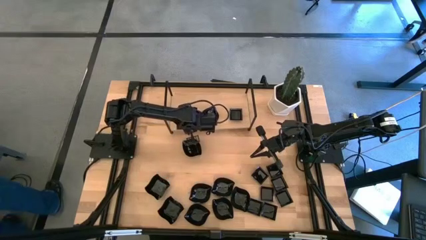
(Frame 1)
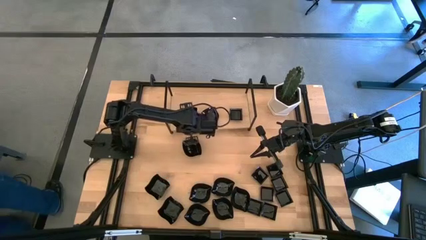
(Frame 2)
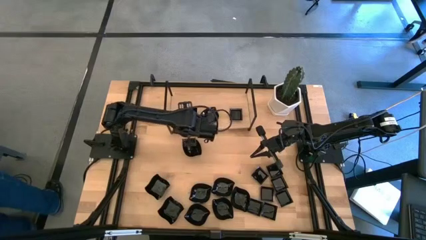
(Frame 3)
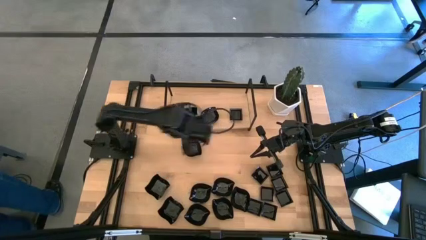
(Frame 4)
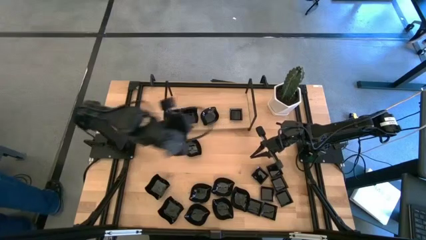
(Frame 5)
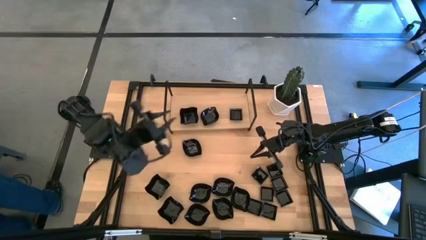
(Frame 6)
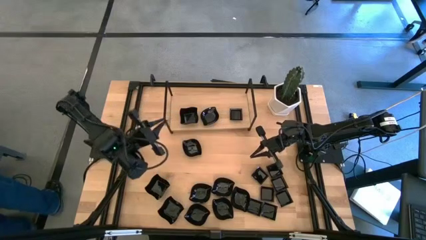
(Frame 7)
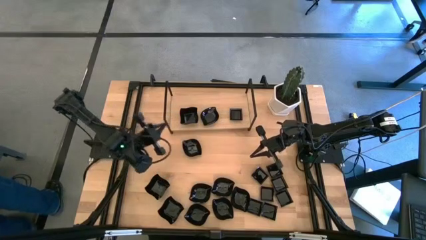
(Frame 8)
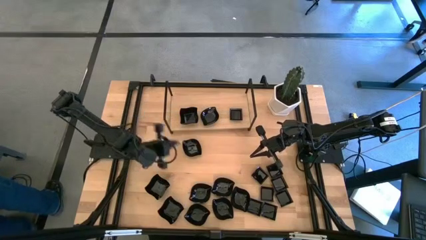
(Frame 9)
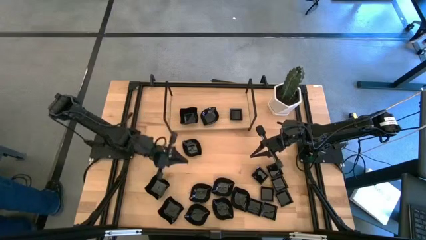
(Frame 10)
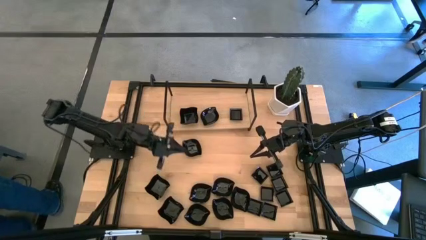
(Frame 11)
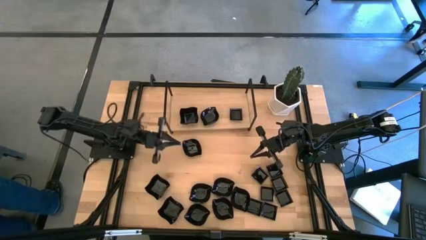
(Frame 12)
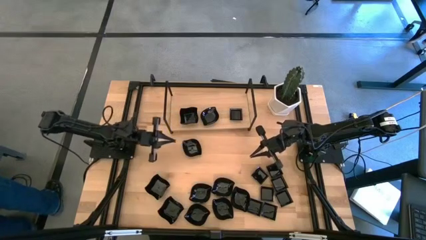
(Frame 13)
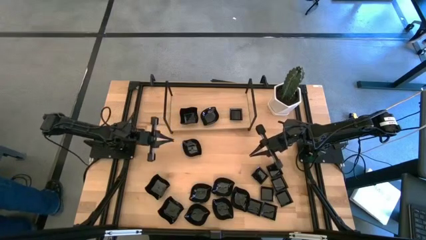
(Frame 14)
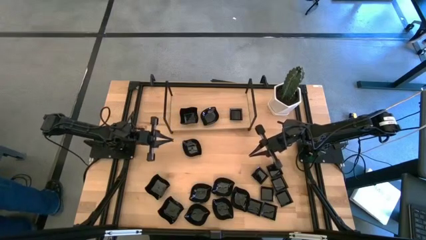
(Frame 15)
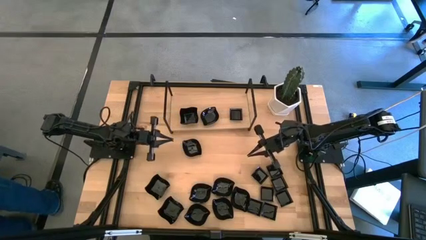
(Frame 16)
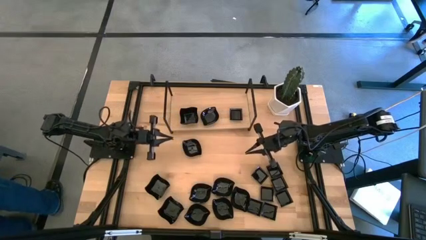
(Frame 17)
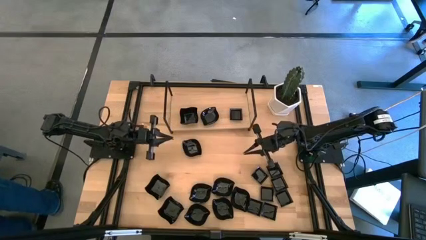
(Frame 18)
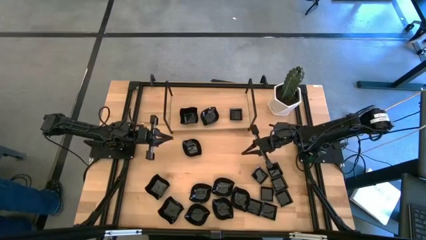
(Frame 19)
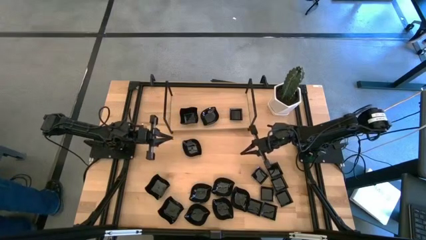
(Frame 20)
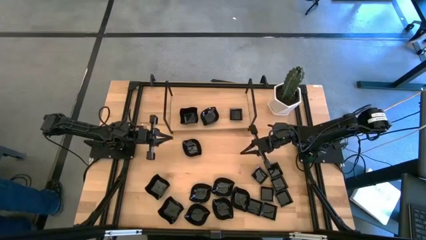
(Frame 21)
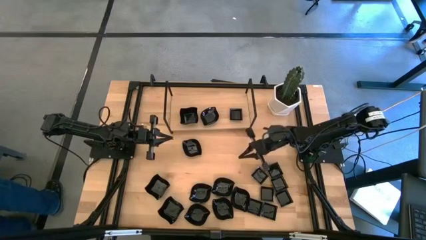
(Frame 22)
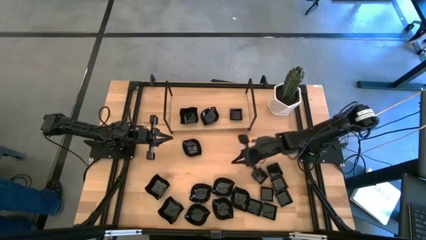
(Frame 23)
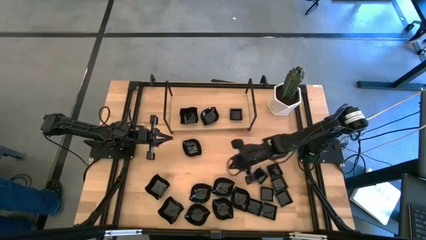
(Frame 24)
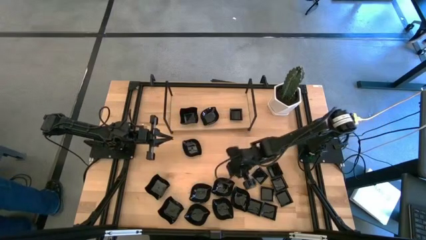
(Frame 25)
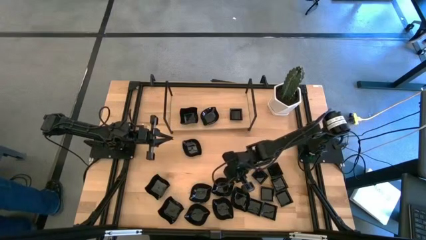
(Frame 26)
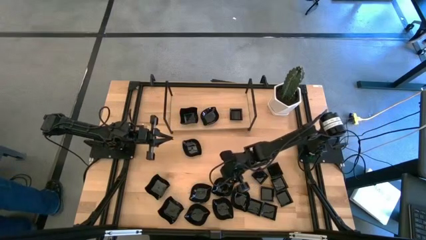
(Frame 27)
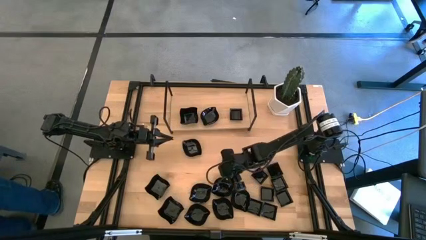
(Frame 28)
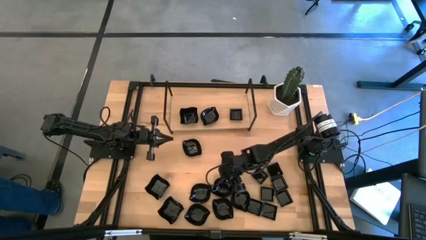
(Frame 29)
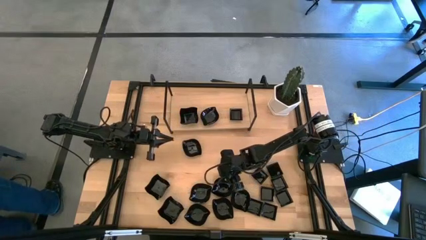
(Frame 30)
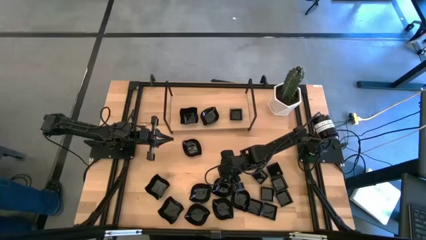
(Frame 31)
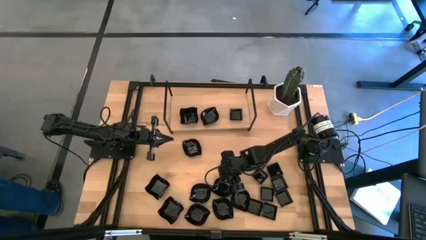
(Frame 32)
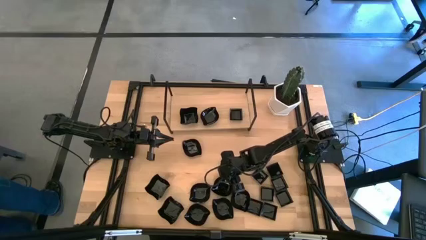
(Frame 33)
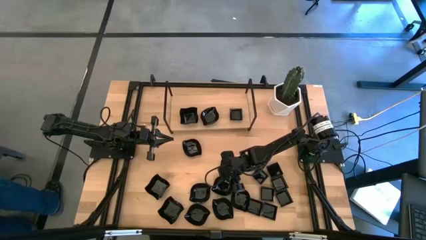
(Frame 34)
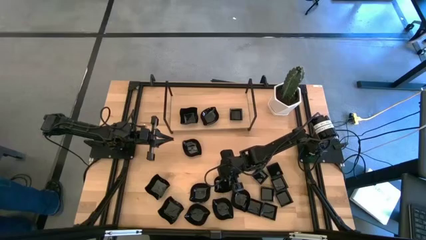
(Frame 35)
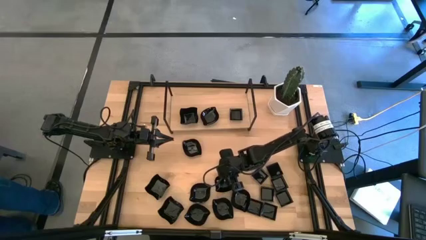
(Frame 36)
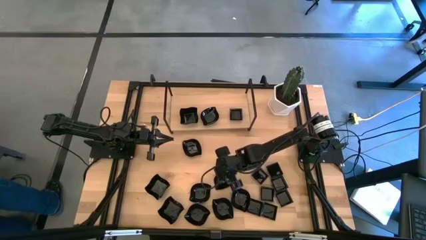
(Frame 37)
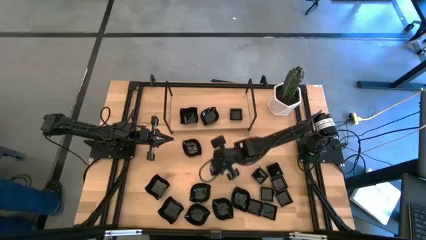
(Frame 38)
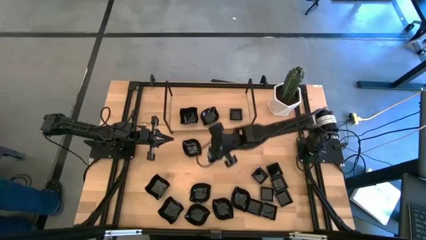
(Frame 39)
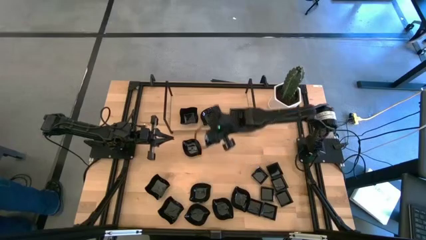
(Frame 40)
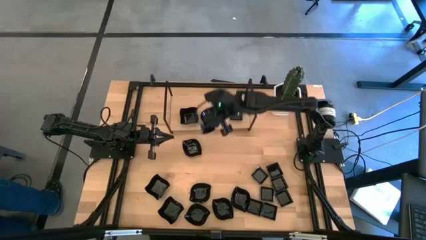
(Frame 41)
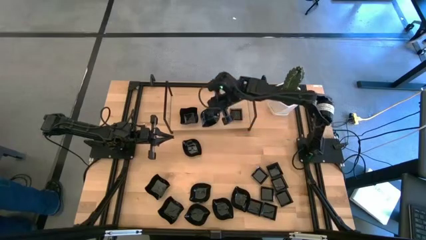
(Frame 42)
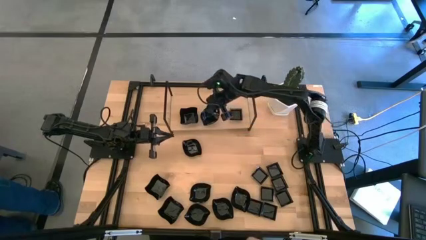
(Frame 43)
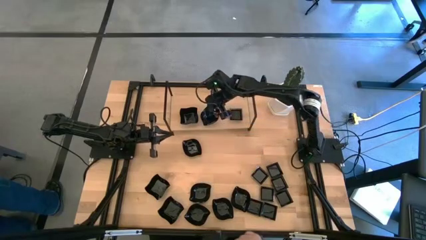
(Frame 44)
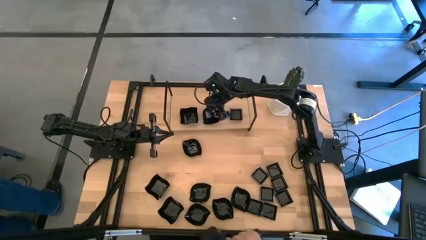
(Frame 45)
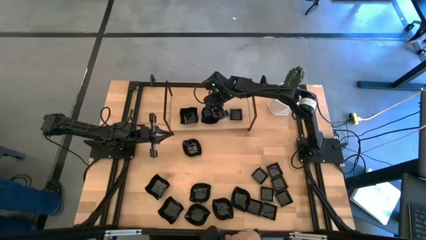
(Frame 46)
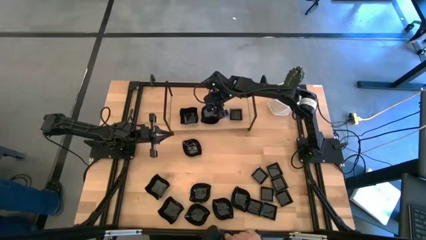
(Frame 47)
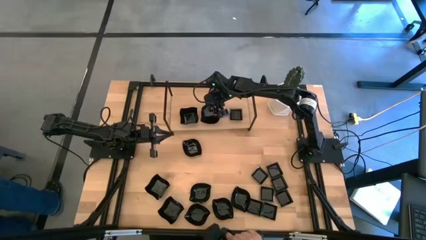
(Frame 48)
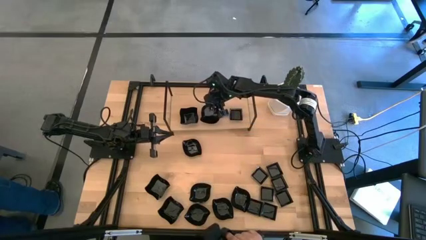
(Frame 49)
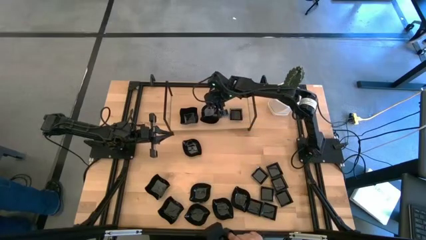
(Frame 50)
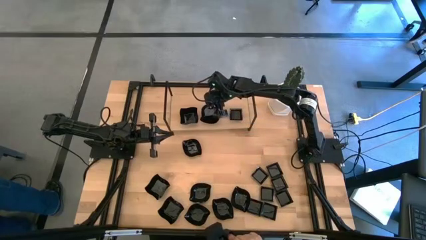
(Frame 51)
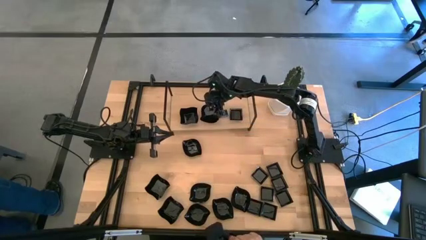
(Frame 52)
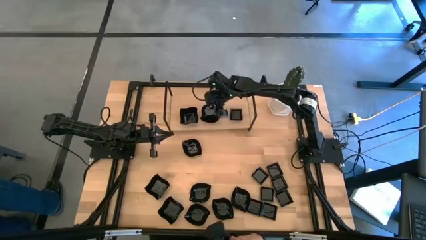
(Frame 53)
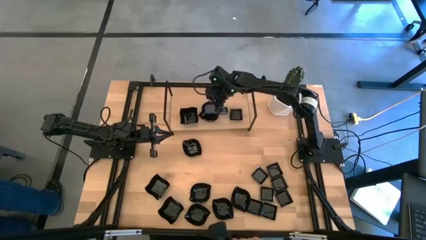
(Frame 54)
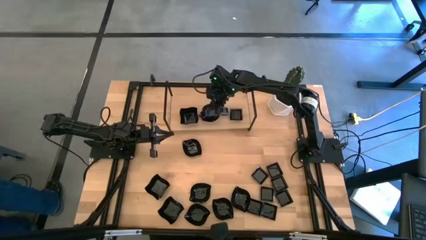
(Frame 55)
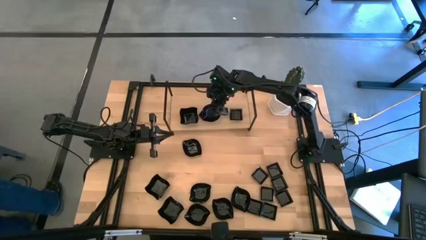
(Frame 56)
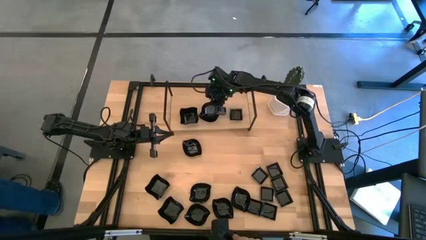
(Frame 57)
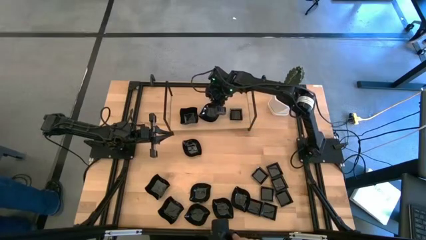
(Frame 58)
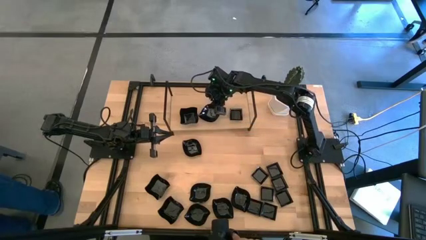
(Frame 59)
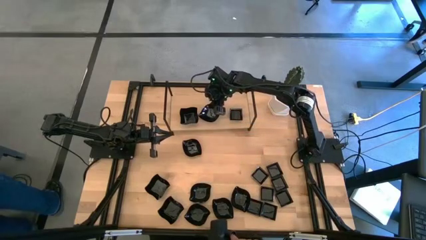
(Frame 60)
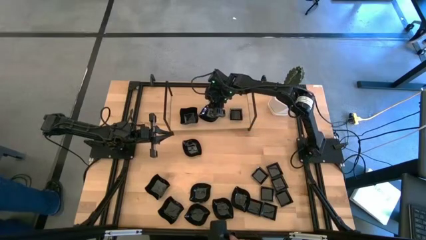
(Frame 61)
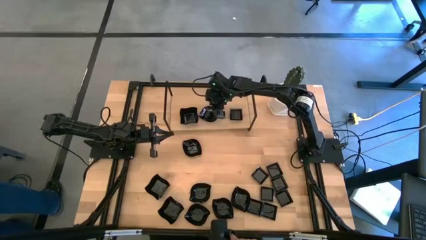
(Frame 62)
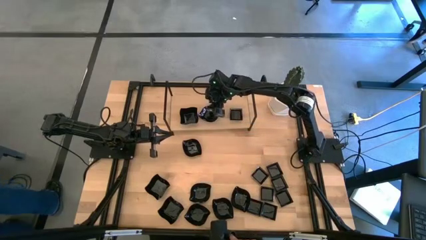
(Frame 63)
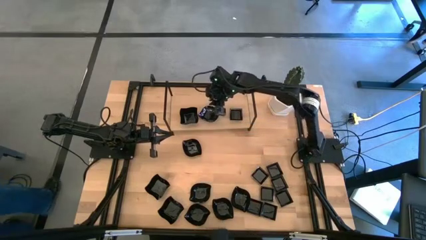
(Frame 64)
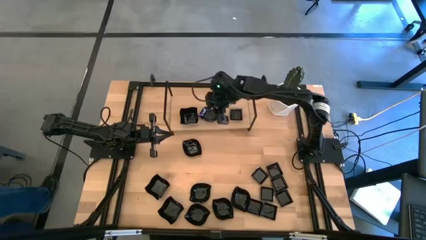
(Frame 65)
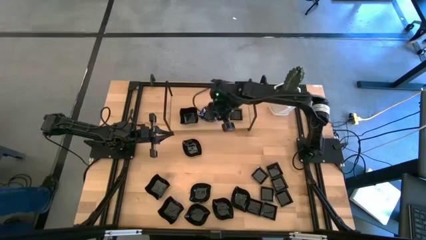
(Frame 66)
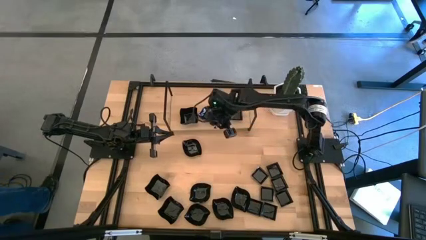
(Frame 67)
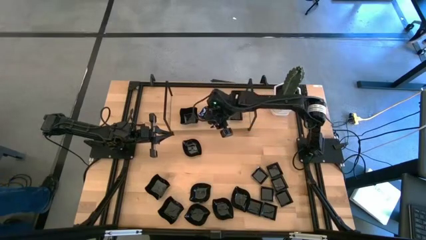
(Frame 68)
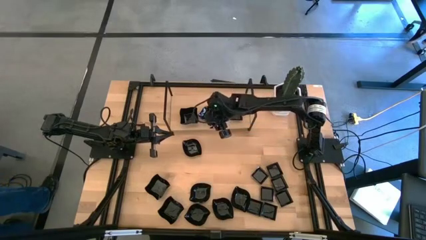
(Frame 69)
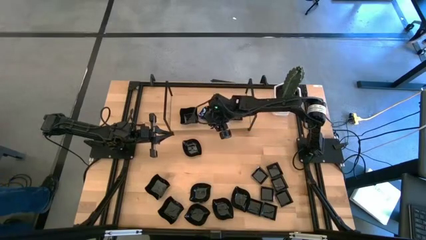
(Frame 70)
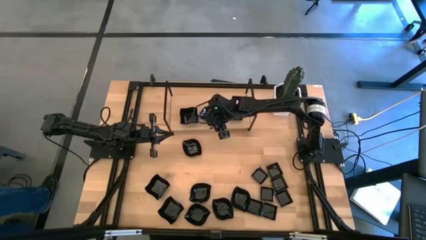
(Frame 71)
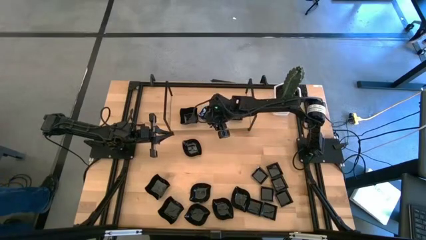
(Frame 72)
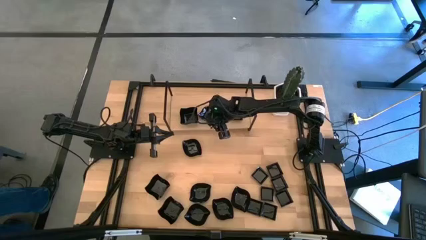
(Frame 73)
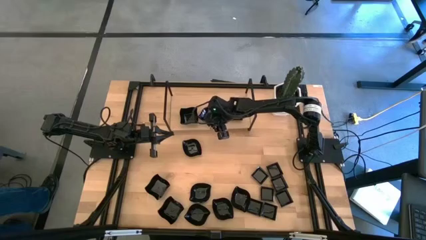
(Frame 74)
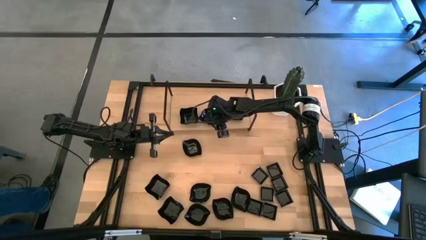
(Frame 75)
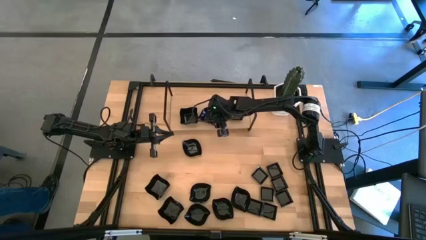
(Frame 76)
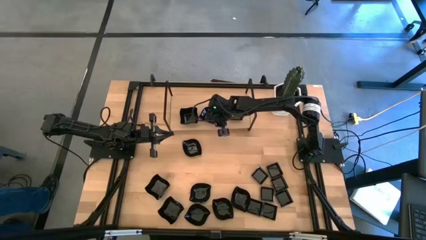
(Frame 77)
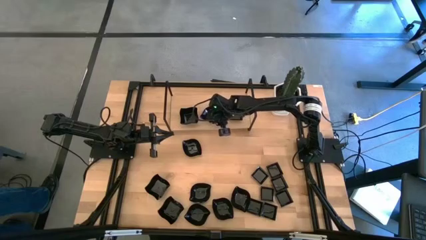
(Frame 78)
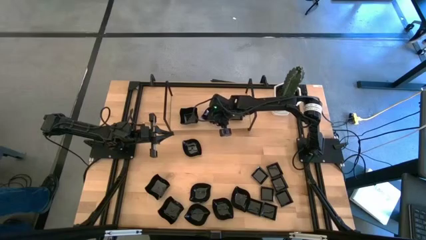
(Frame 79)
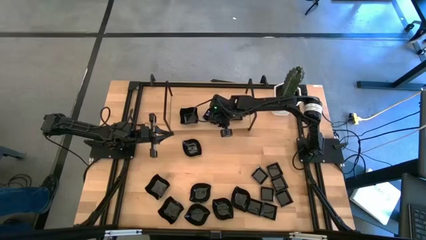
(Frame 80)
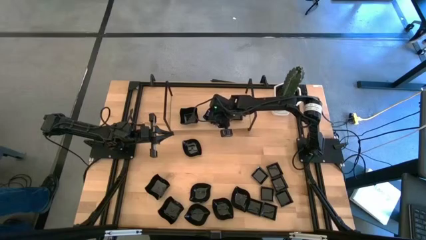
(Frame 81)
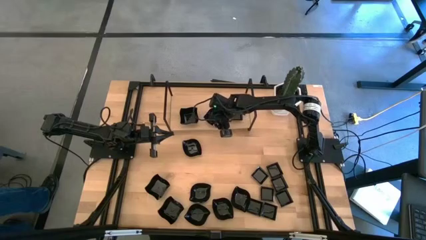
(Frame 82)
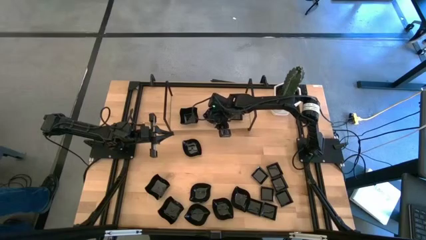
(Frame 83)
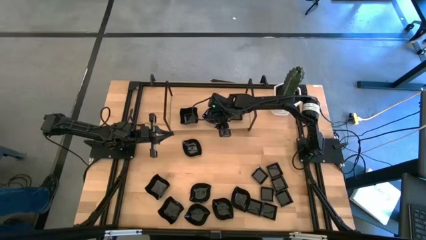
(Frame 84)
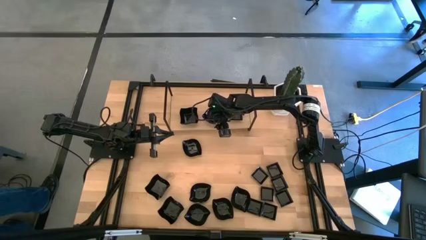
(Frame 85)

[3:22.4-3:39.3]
Task: Pick & Place Mini shaped plates
Stack the leaf-shaped plate on the top of the leaf-shaped plate on the shelf
